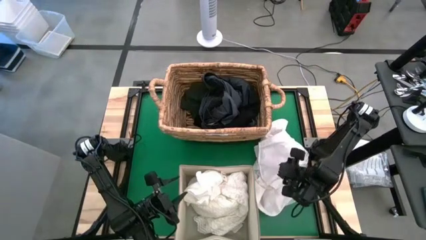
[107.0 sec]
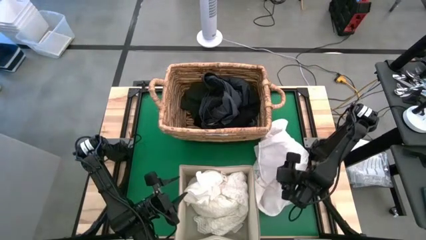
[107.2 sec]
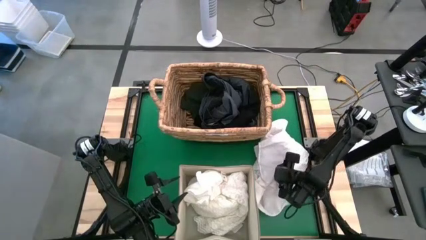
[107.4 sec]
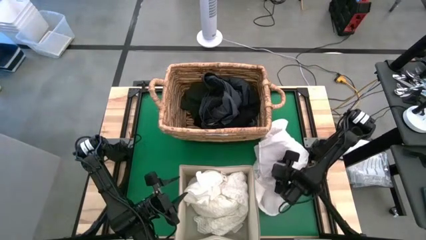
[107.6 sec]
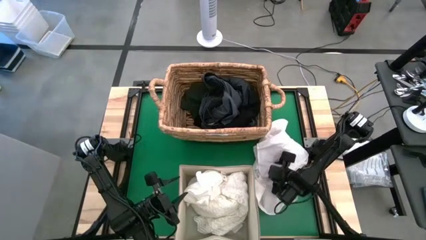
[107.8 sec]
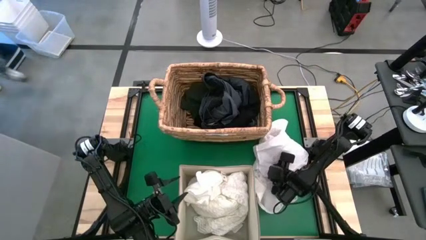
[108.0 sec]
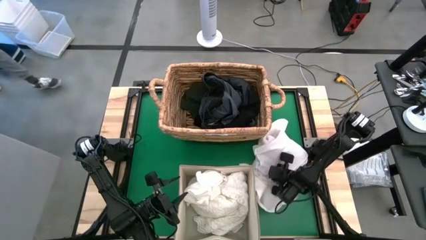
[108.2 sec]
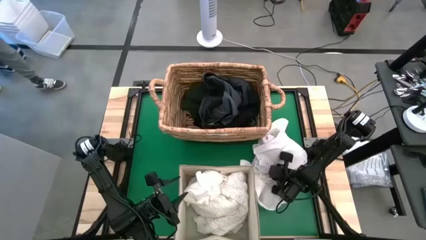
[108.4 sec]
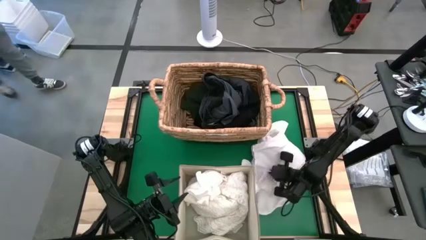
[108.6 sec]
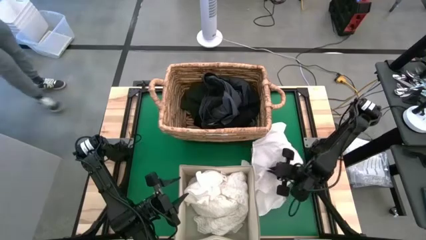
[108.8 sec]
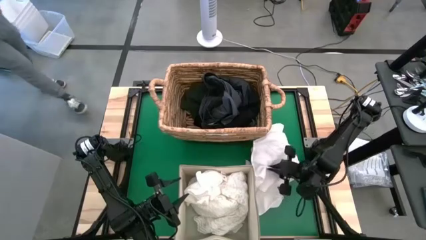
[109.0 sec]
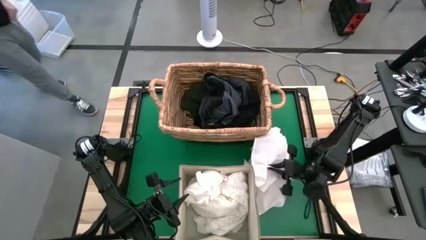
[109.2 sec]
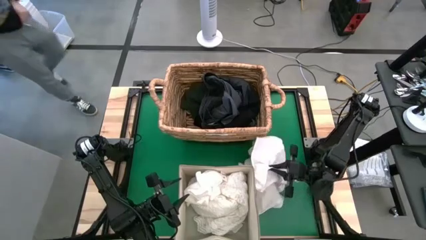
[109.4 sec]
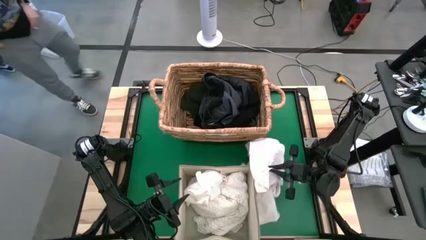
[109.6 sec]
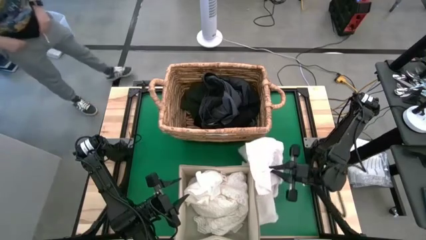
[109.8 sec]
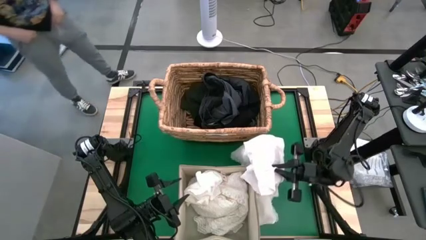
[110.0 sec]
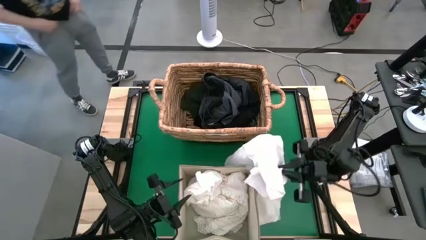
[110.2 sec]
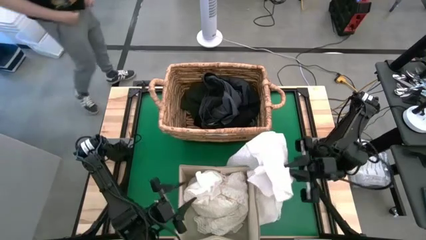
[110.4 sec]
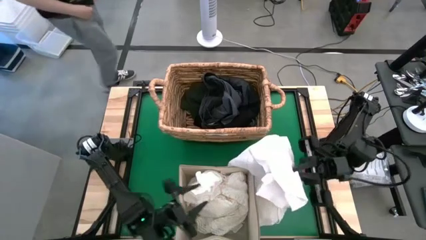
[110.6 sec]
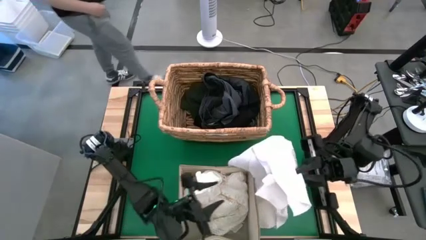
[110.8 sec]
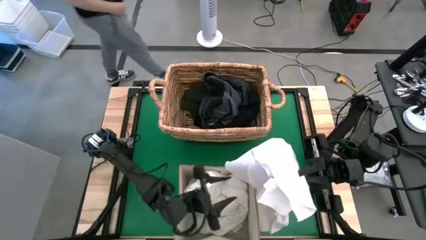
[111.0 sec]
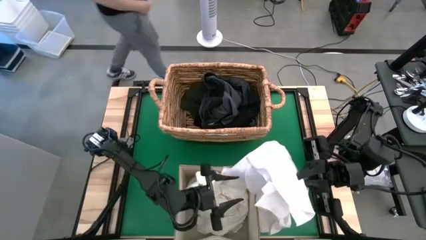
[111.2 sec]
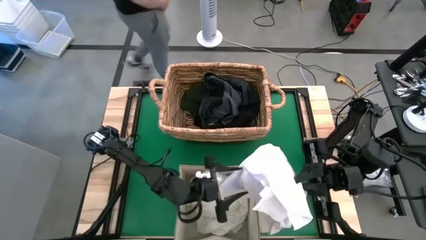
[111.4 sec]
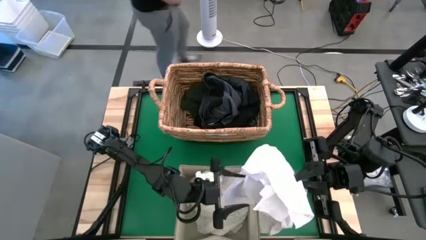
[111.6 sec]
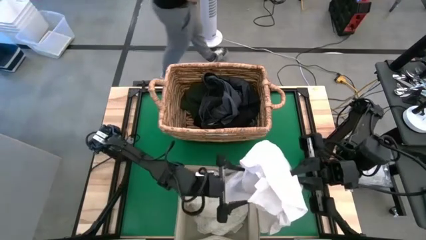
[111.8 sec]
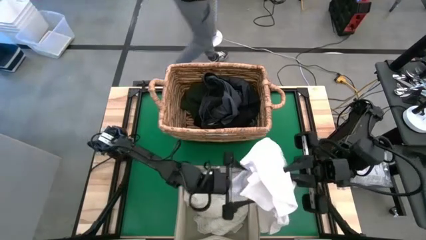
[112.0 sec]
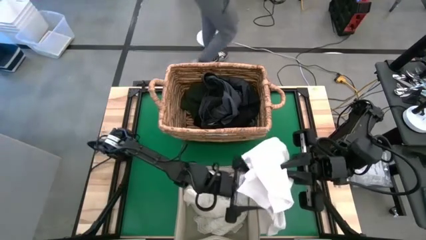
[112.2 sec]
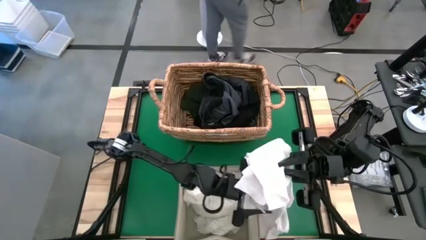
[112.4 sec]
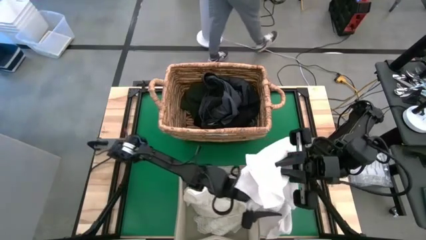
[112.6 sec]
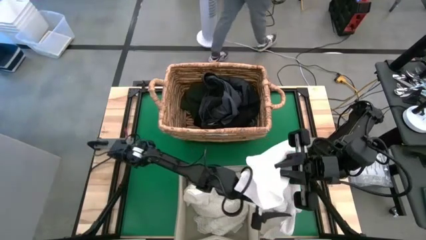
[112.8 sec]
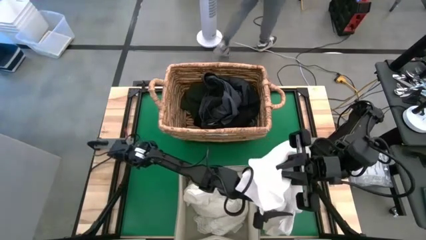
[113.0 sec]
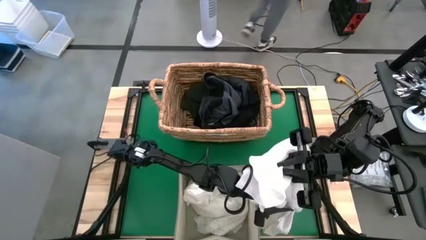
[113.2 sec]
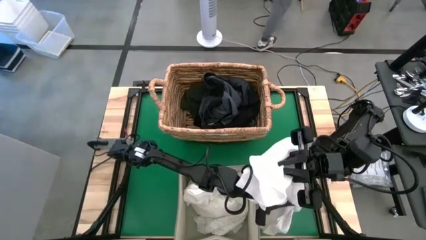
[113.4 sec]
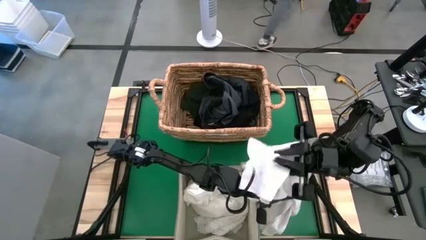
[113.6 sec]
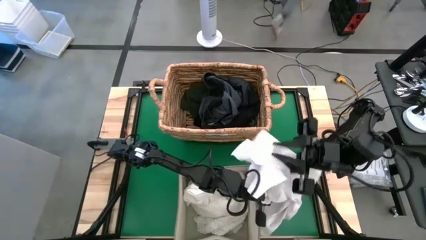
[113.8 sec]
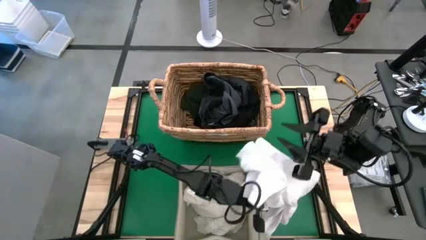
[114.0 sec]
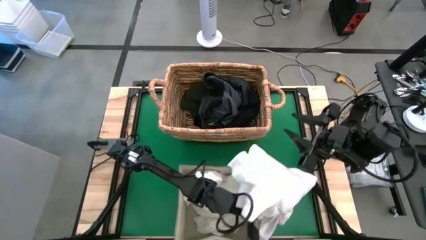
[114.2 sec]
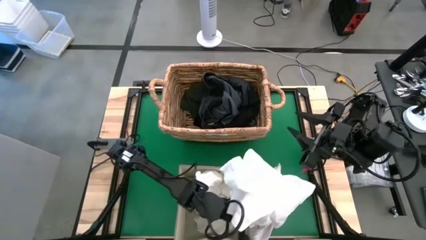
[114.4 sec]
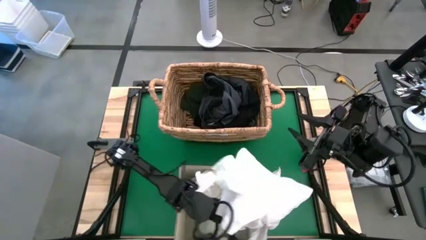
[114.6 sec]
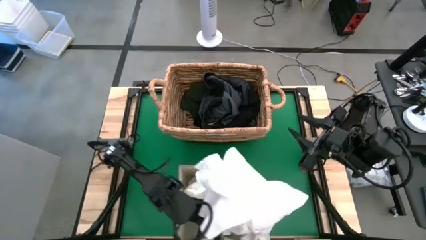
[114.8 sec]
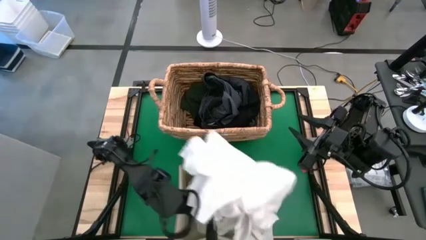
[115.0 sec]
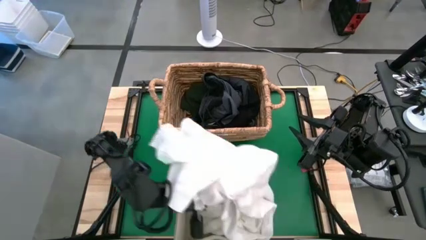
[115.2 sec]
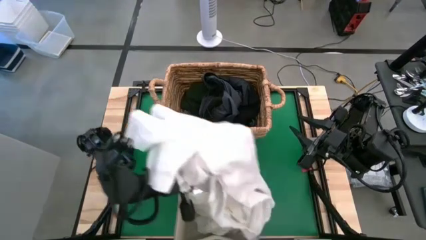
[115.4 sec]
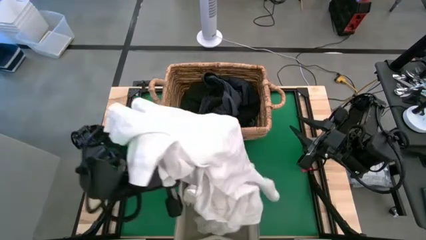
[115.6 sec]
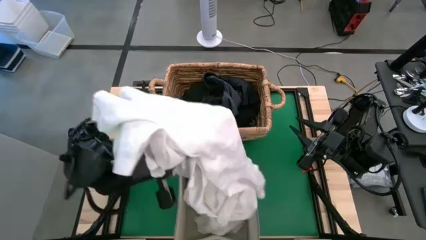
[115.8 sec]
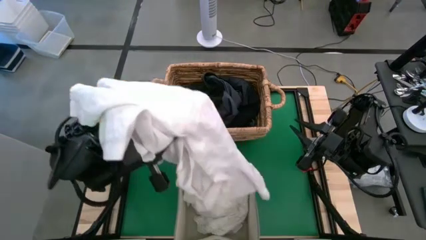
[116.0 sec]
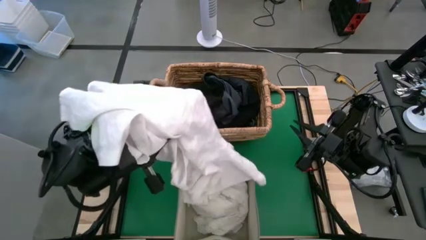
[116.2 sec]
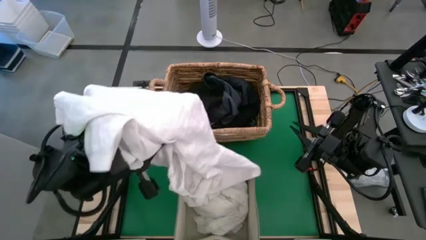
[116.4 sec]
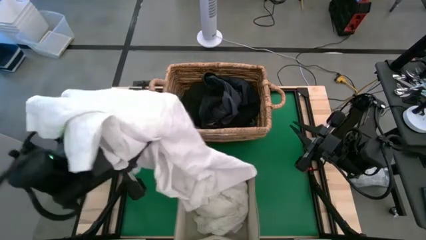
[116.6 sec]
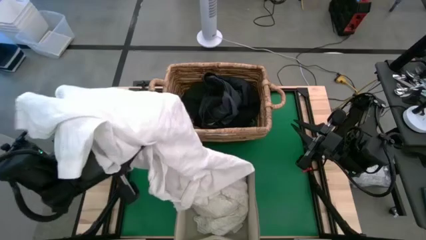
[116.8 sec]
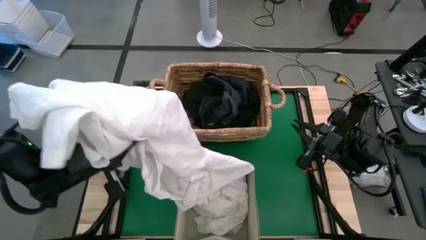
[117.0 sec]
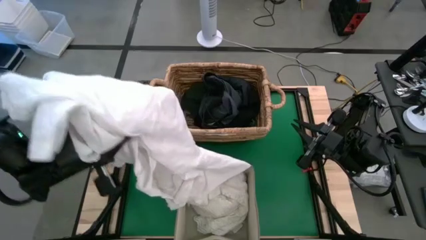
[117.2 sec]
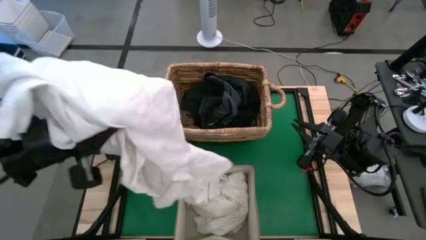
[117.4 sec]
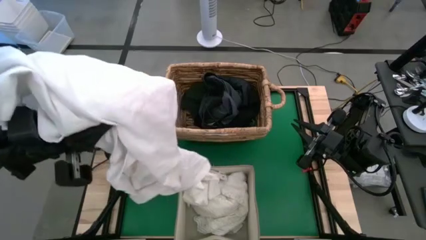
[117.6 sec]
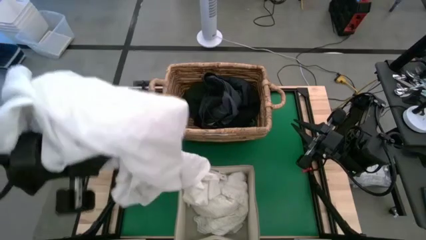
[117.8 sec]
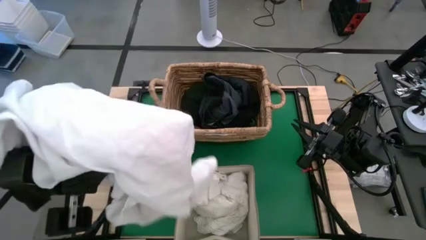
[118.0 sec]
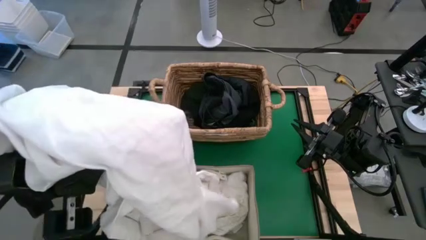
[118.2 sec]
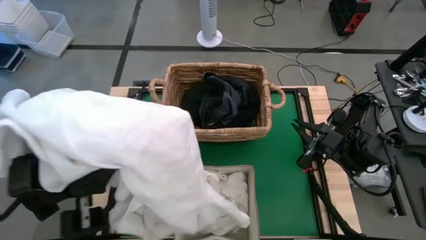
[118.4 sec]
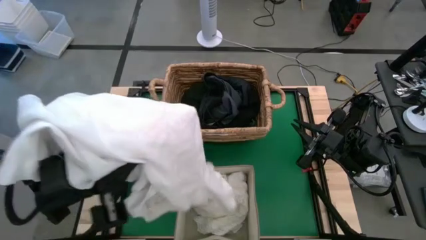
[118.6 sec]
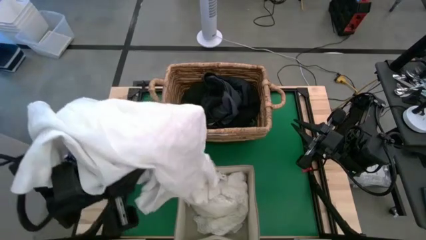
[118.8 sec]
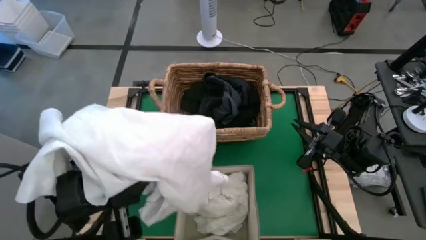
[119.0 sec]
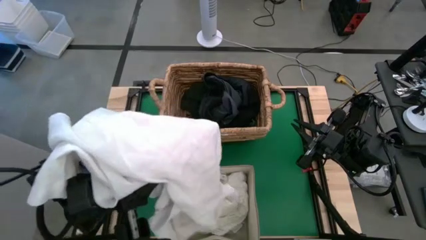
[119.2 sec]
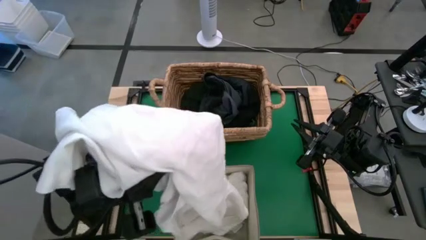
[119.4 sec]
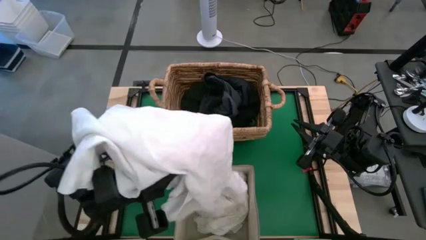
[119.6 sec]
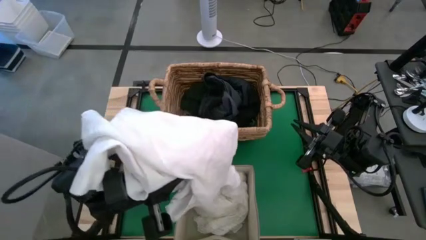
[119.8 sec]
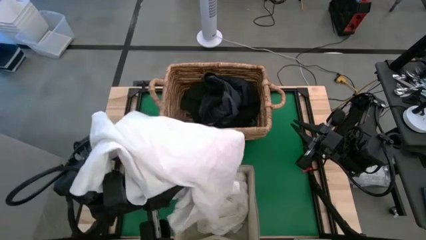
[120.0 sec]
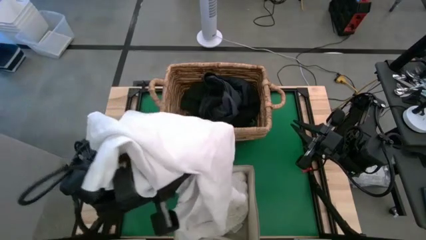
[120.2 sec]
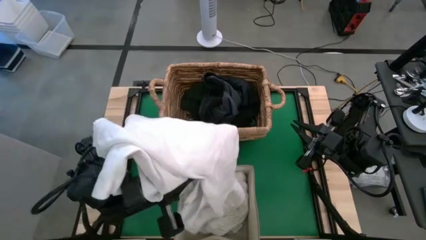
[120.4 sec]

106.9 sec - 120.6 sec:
Put the white shirt into the white laundry organizer
